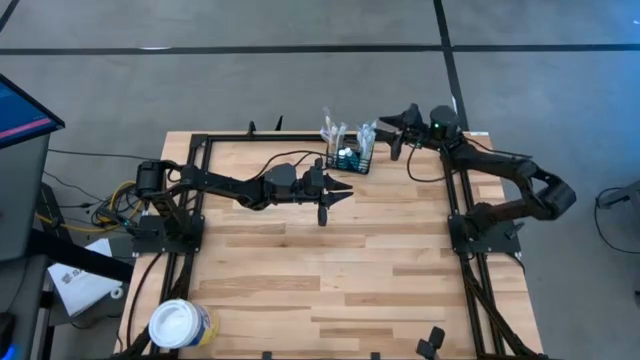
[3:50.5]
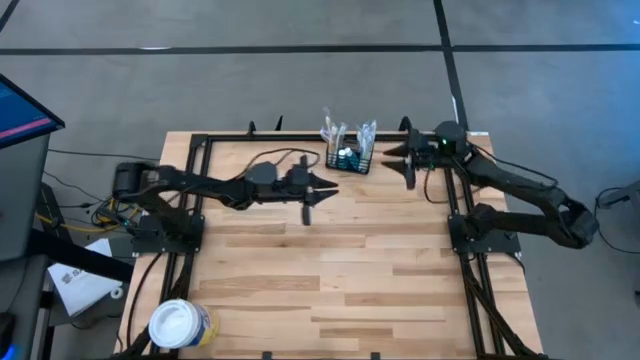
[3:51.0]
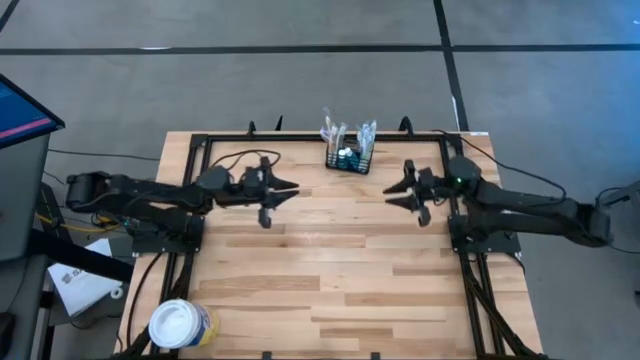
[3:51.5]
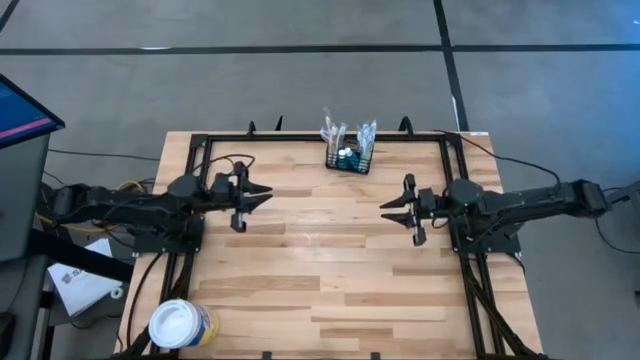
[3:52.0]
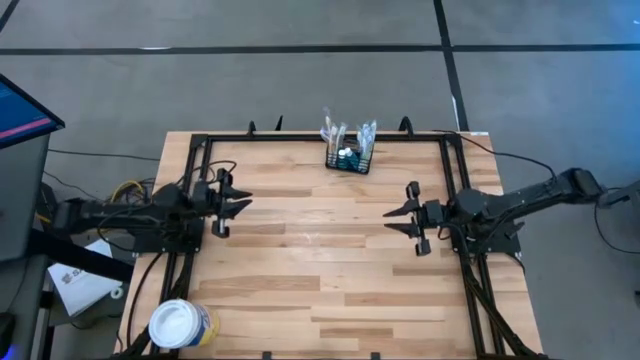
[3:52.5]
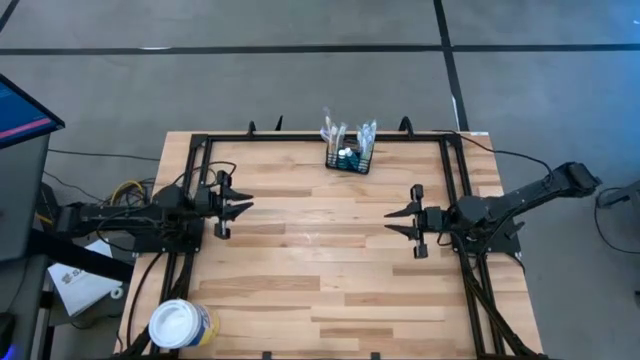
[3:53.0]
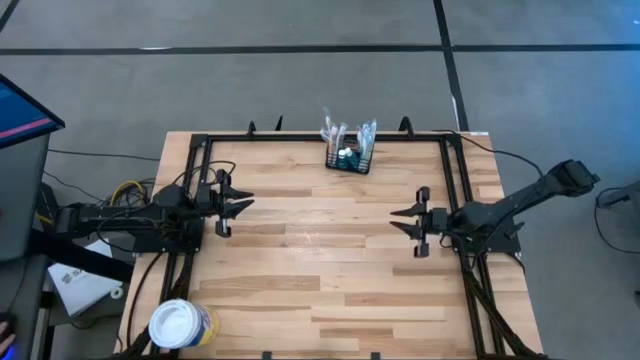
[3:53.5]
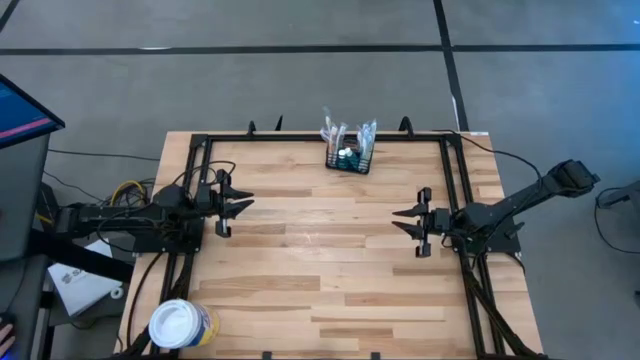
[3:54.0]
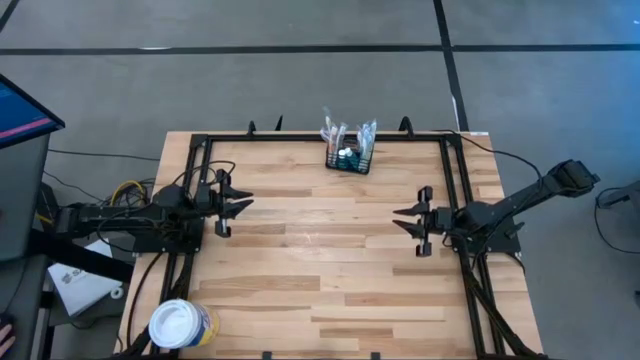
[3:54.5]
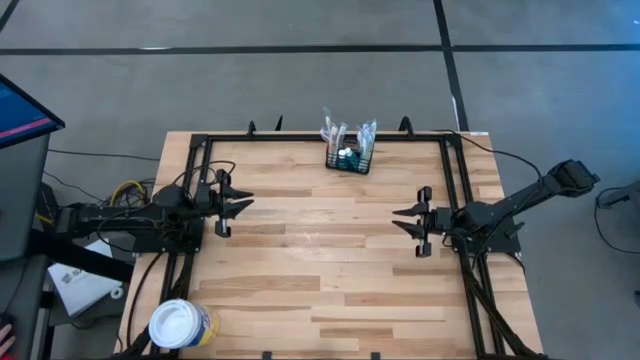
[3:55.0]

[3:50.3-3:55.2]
Task: Pick & Place toothbrushing station
Return to Home Position

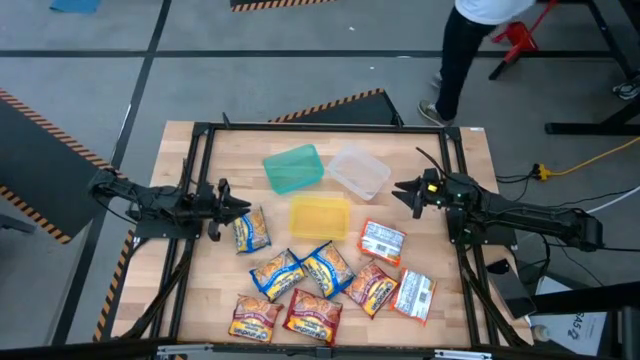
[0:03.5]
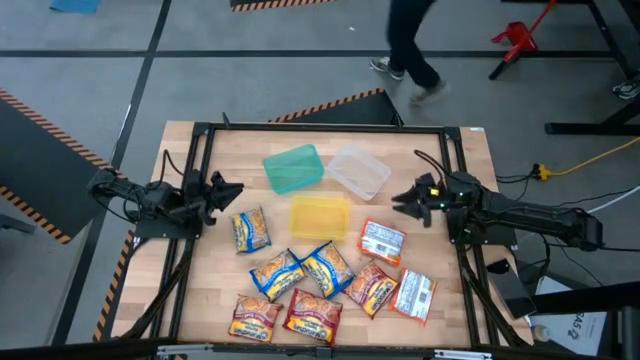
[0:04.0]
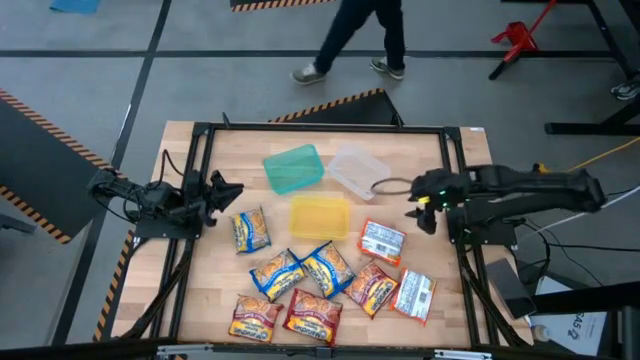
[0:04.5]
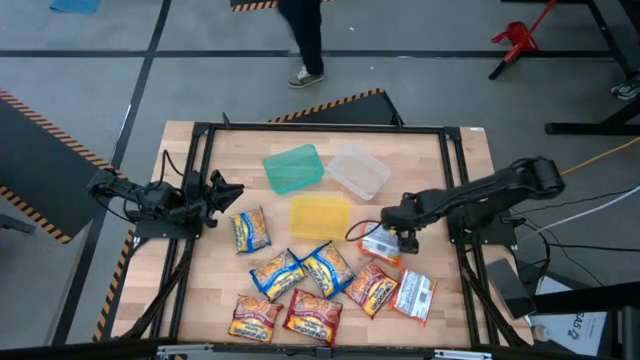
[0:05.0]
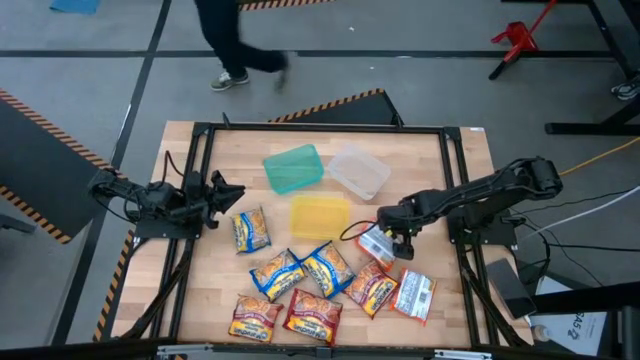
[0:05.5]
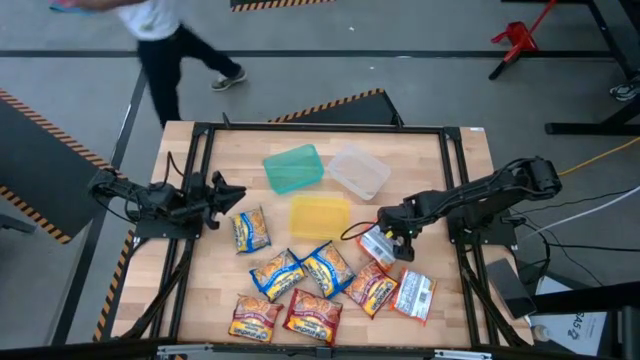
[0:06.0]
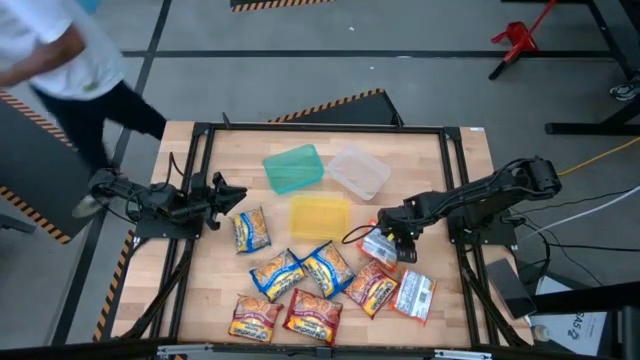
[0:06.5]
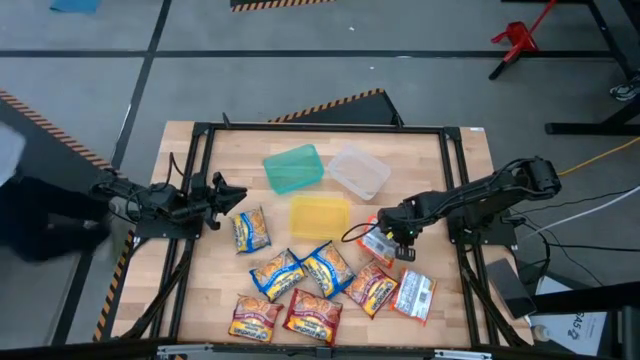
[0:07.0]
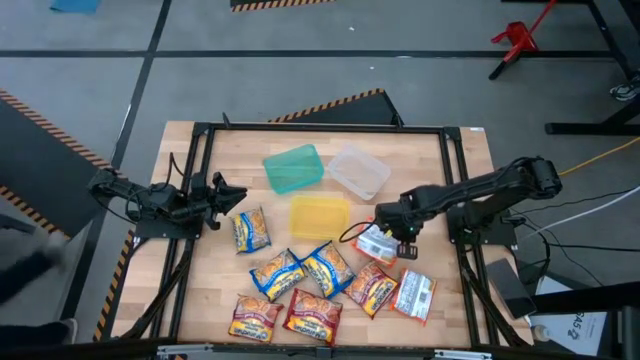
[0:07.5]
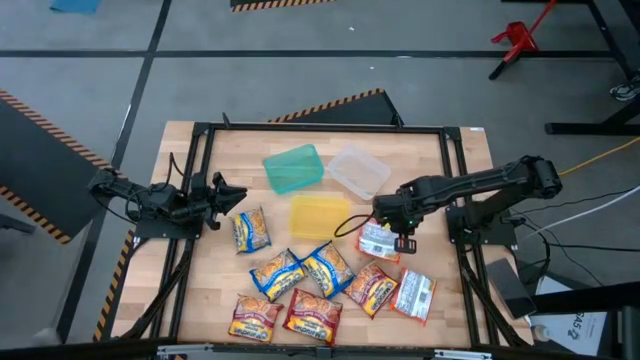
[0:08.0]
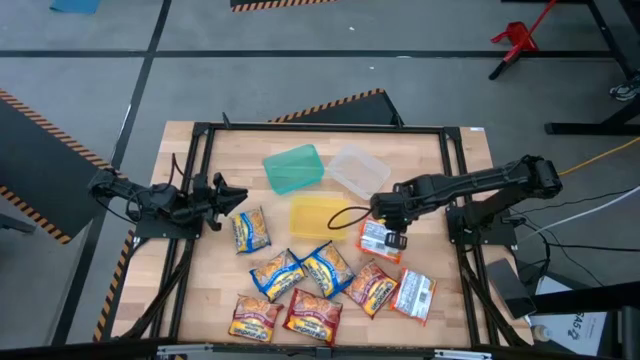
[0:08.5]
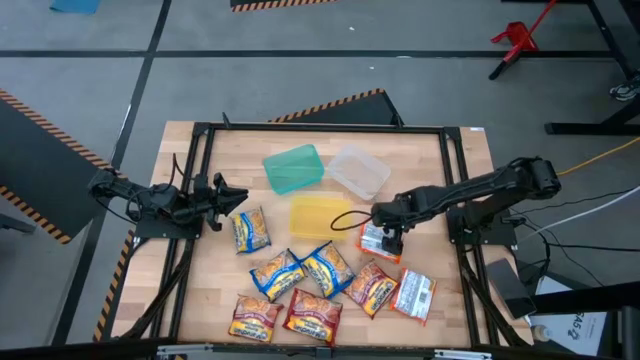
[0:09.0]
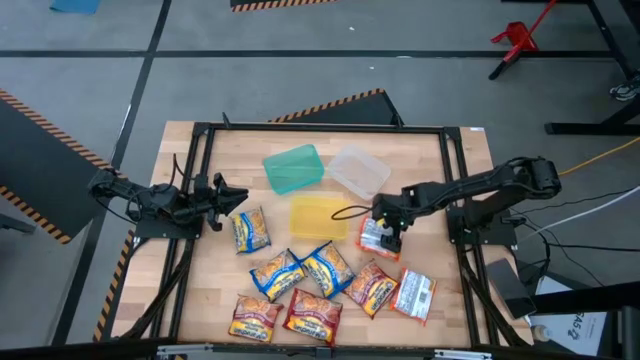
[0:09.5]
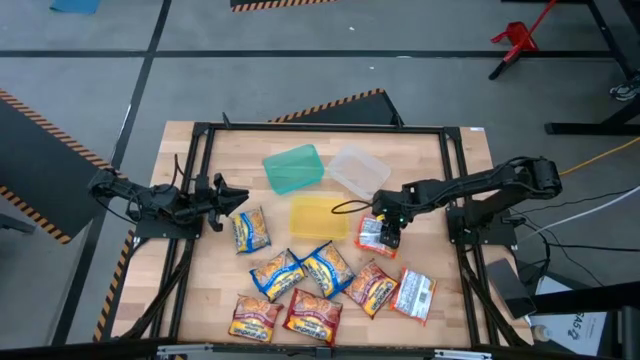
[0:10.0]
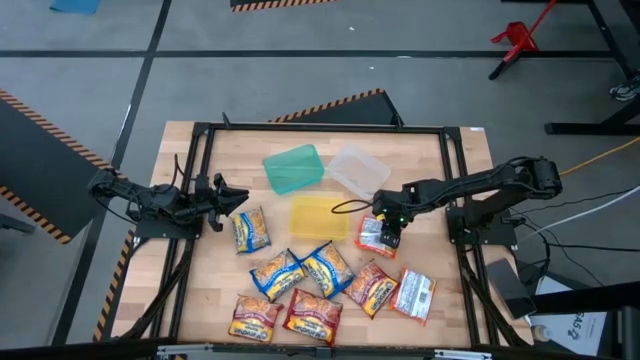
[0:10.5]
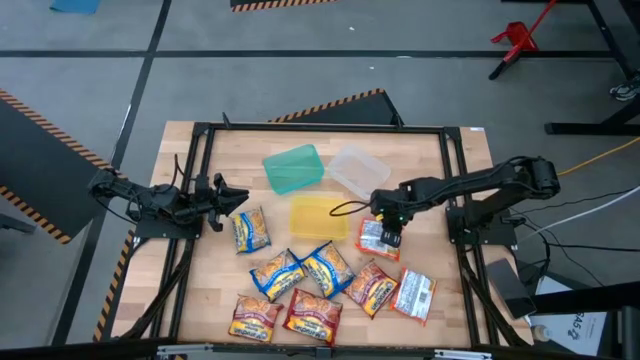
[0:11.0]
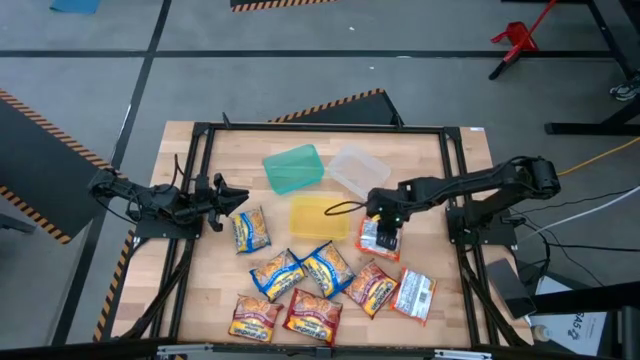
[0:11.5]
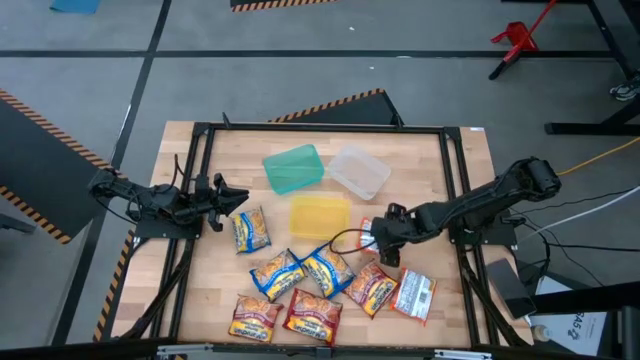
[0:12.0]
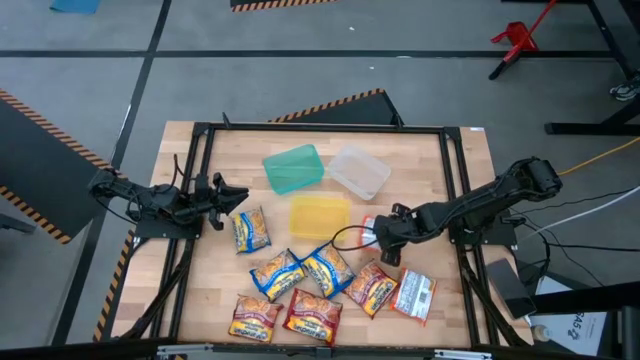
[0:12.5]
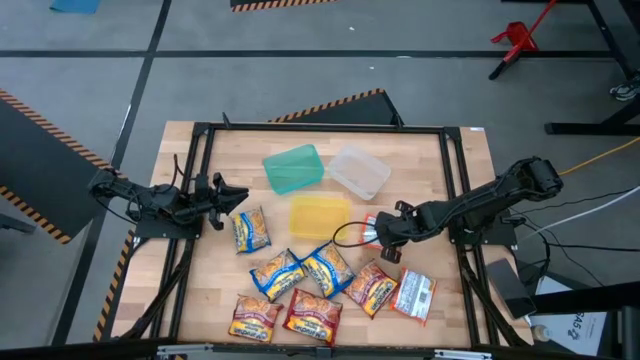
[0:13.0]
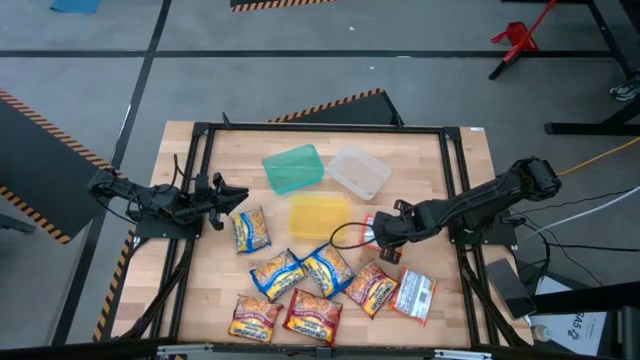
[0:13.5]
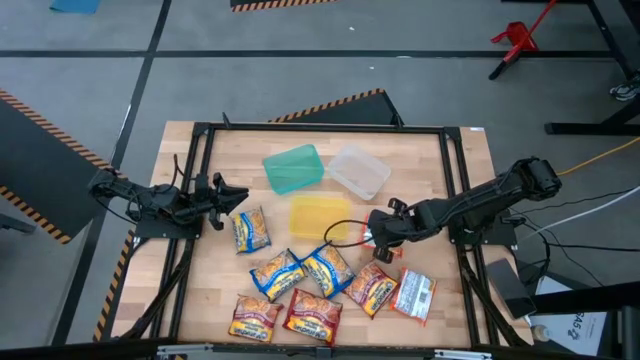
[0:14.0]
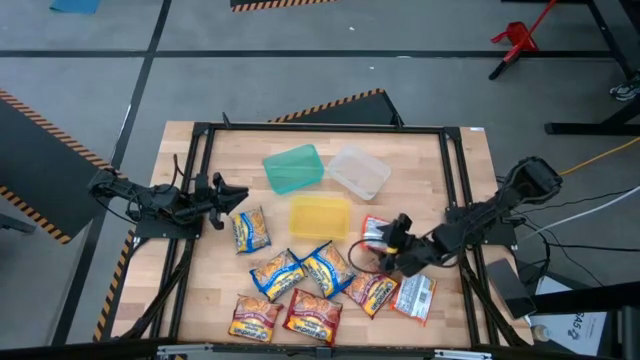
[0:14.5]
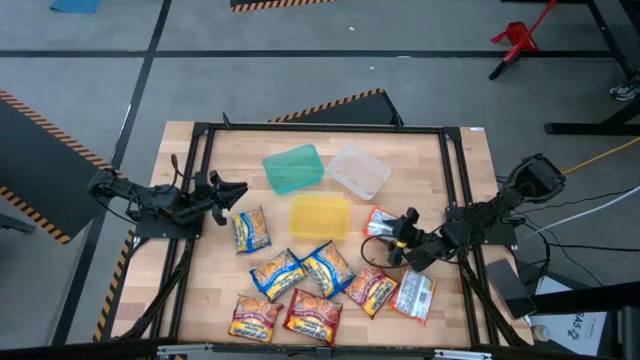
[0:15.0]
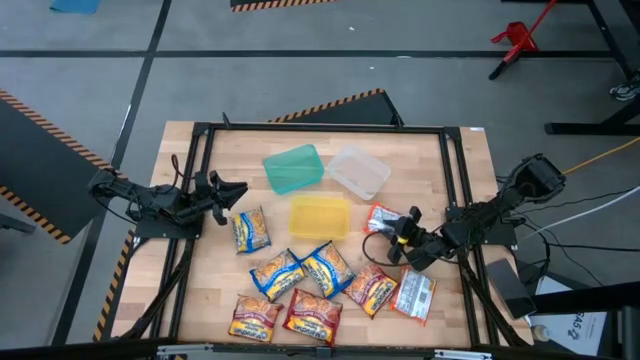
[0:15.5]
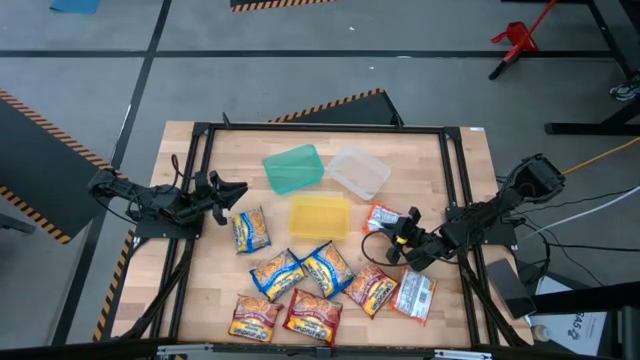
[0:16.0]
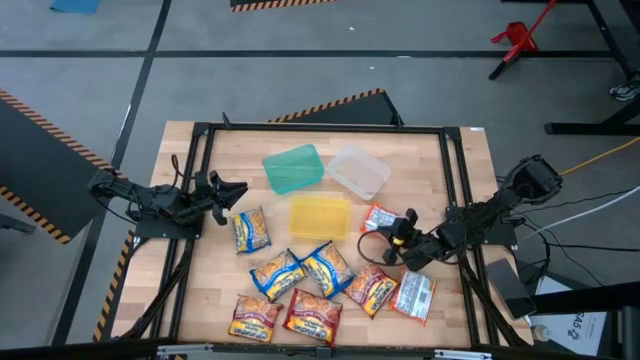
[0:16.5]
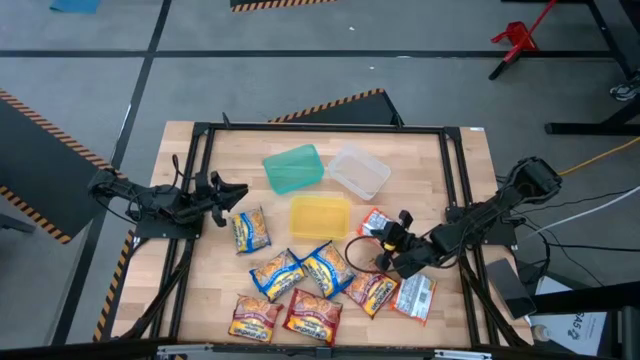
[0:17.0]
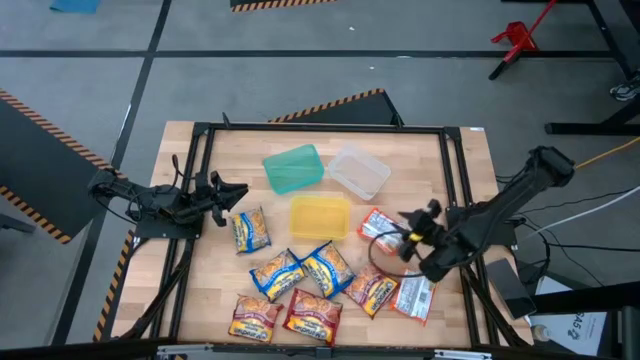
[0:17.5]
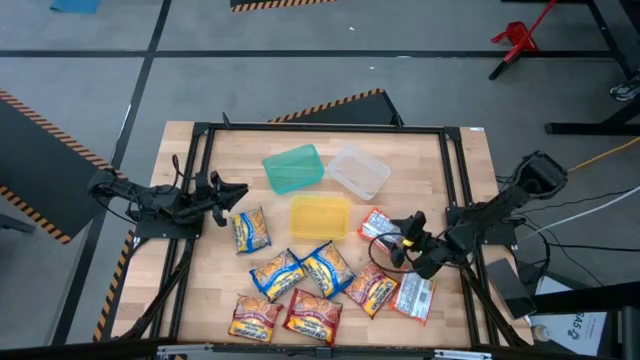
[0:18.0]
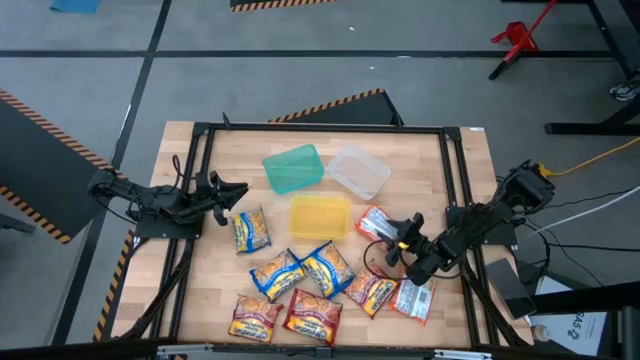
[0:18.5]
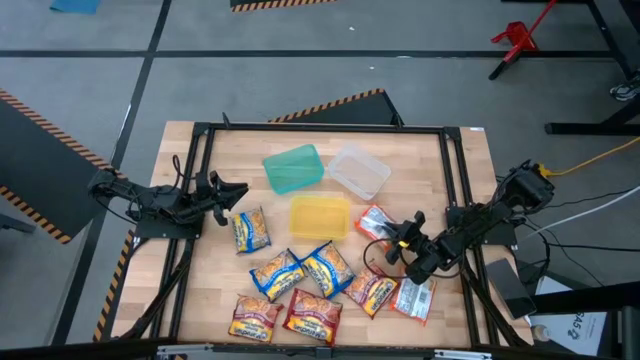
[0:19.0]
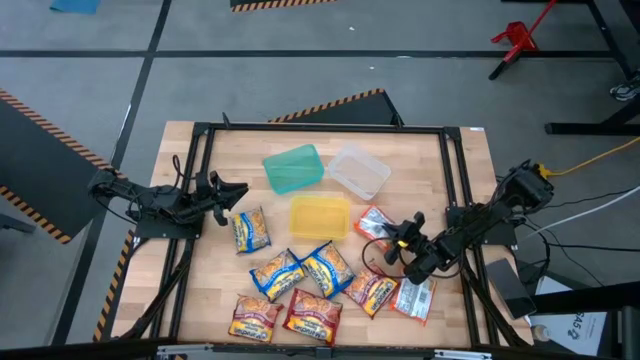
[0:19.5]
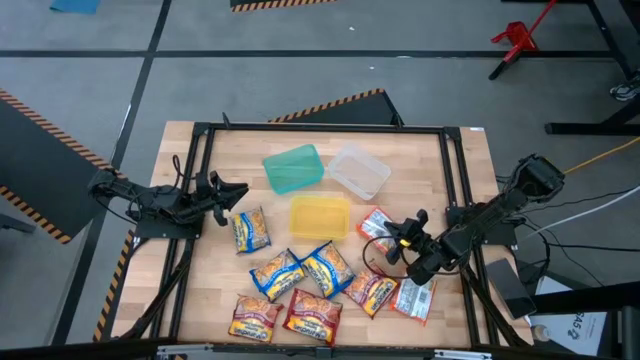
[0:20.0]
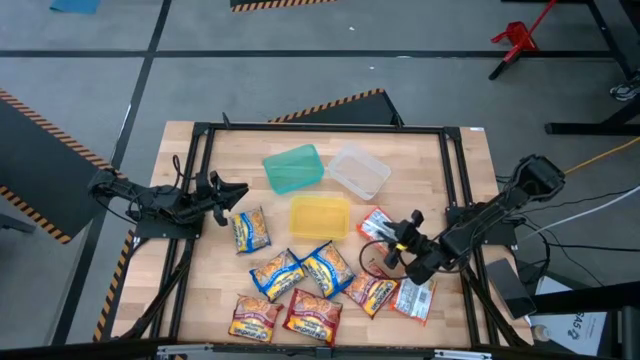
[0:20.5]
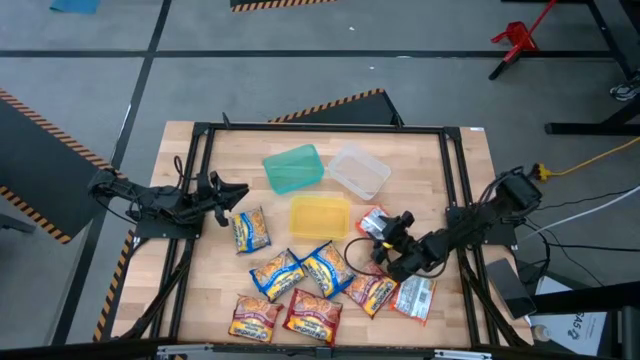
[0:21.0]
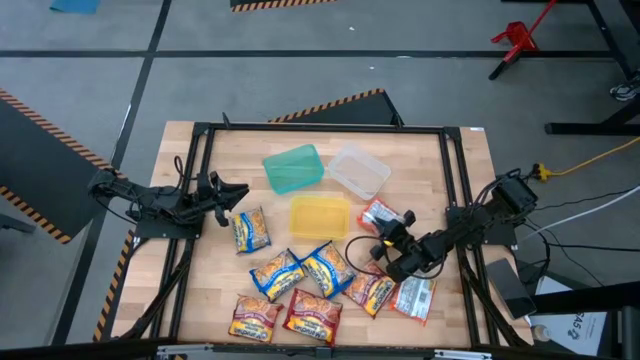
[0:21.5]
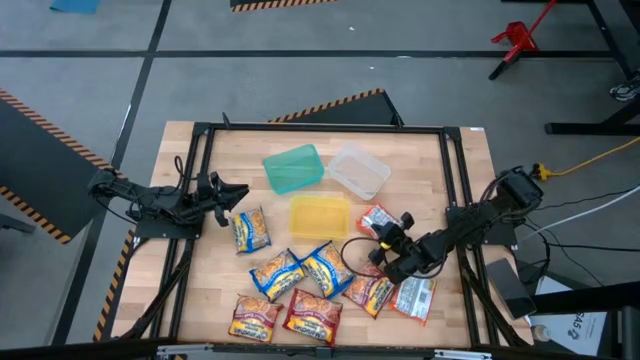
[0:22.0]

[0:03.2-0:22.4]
Task: Sort Maruchan noodles
Put the top orange noodle pack into the white bin
